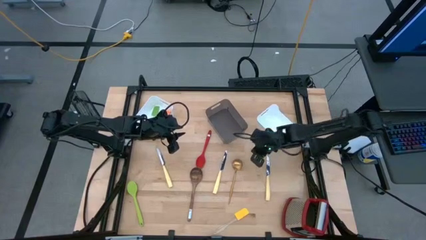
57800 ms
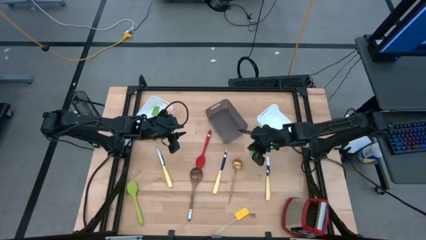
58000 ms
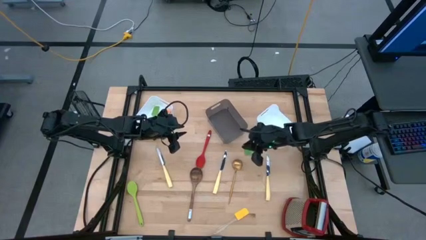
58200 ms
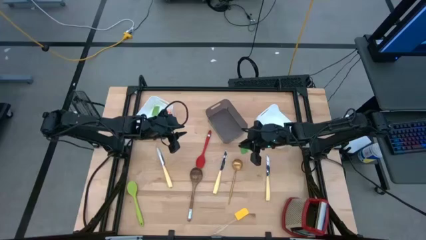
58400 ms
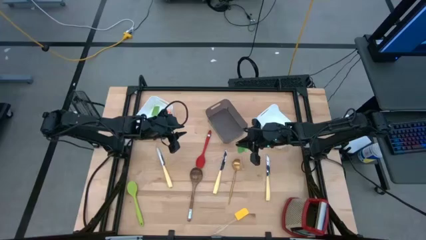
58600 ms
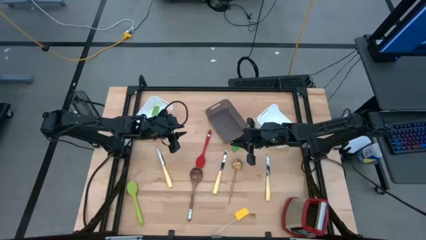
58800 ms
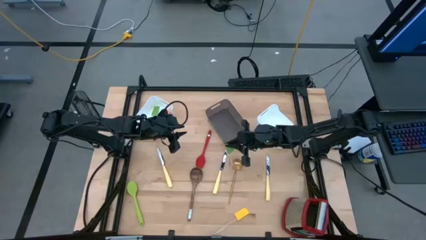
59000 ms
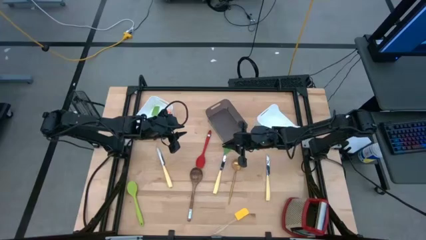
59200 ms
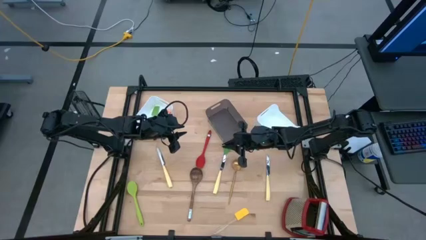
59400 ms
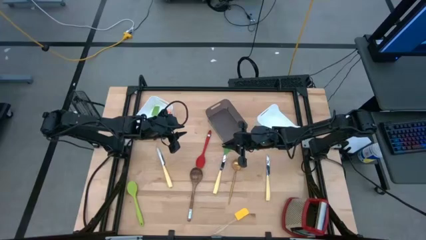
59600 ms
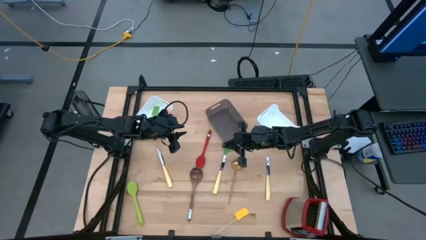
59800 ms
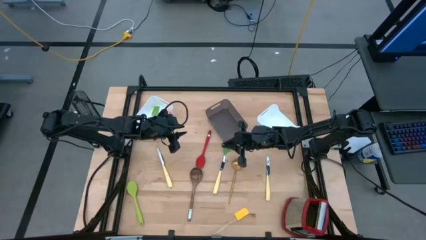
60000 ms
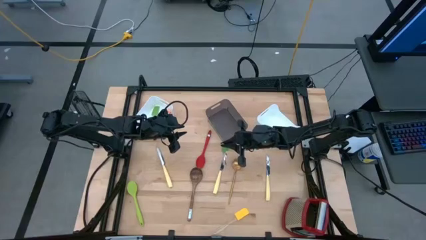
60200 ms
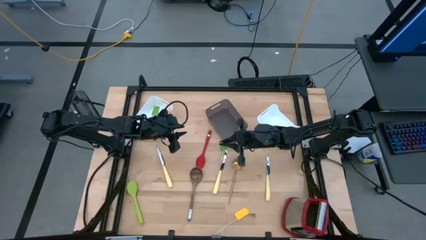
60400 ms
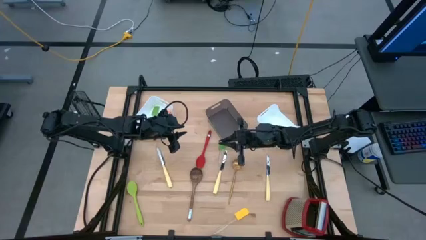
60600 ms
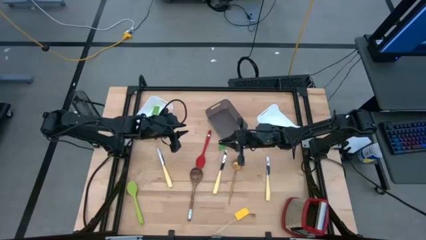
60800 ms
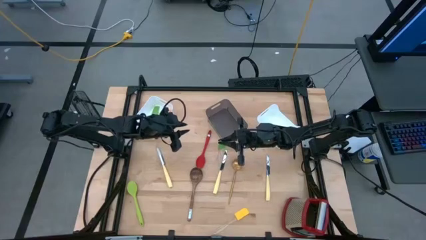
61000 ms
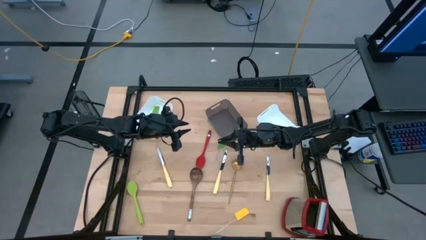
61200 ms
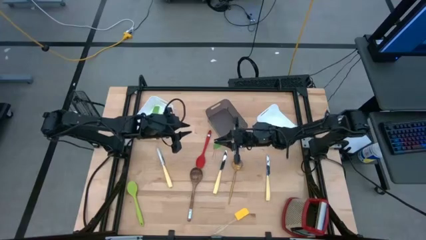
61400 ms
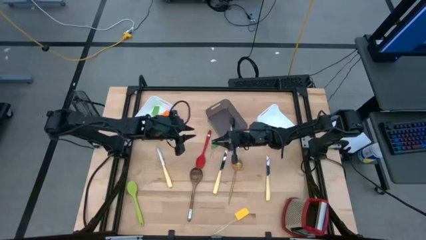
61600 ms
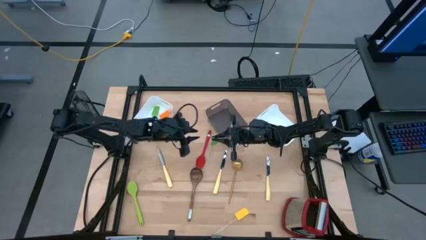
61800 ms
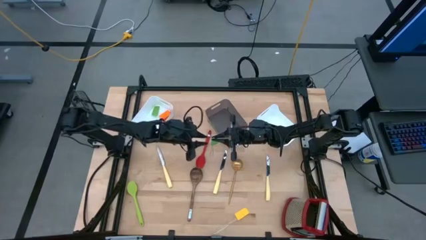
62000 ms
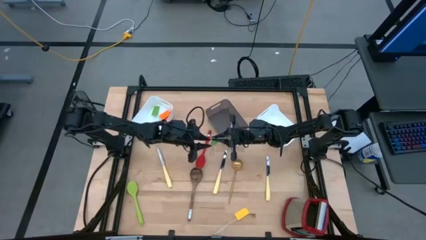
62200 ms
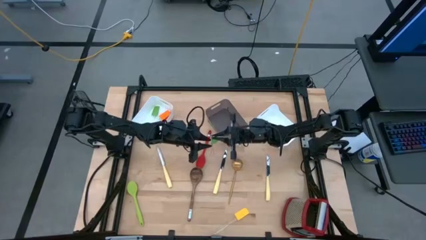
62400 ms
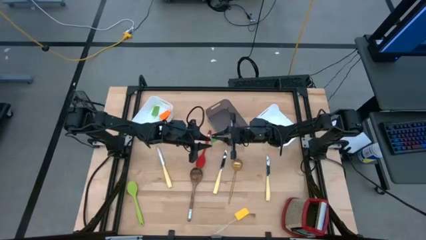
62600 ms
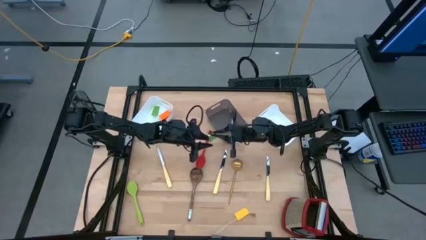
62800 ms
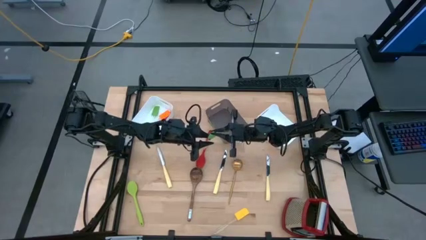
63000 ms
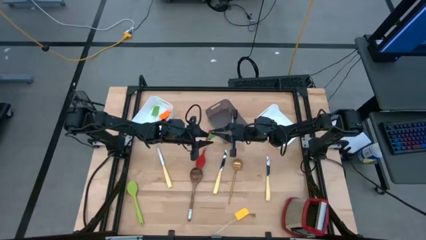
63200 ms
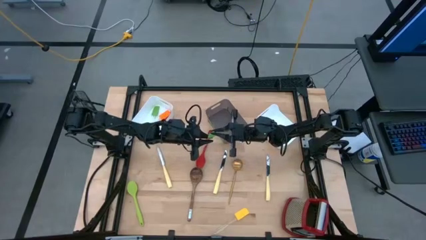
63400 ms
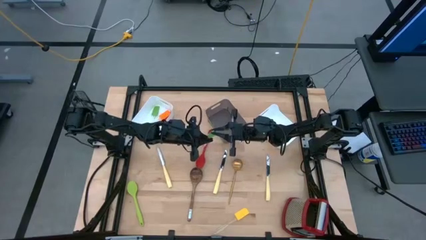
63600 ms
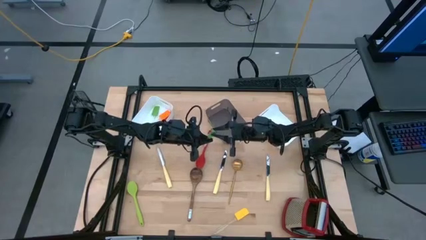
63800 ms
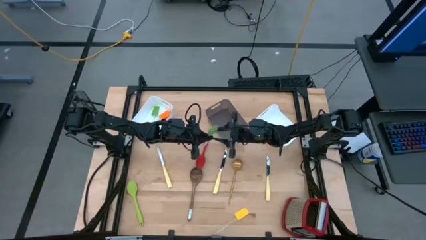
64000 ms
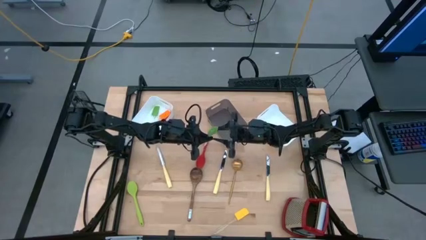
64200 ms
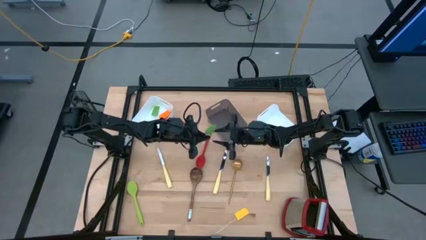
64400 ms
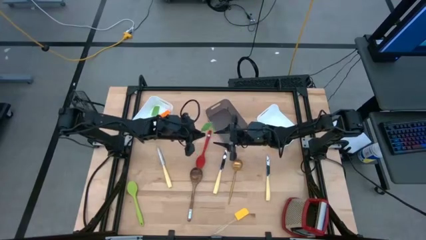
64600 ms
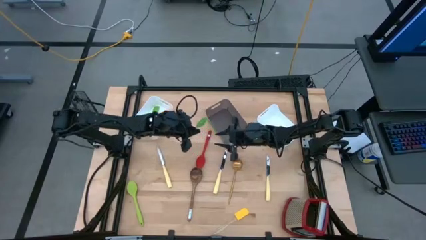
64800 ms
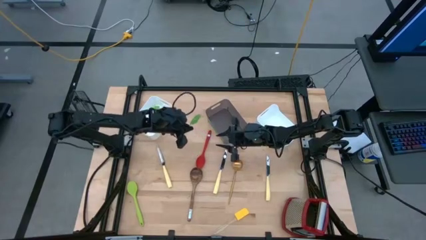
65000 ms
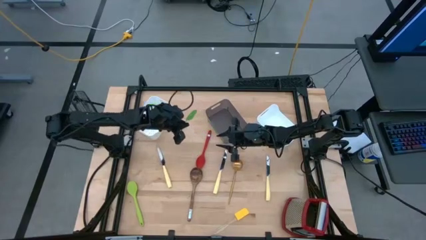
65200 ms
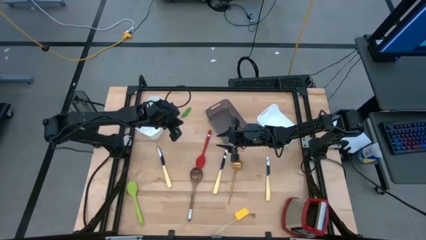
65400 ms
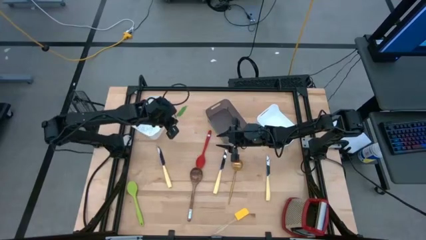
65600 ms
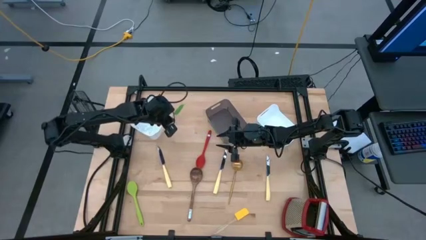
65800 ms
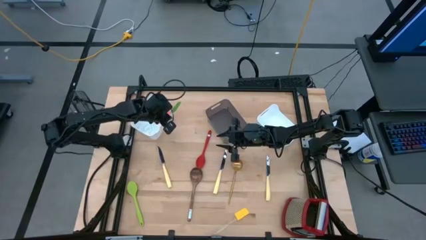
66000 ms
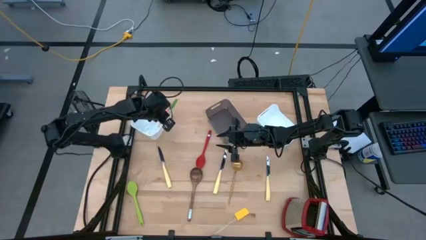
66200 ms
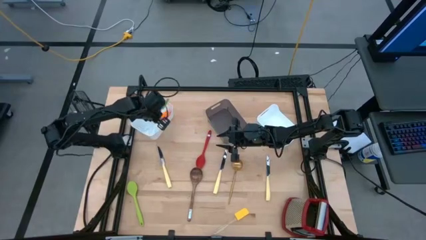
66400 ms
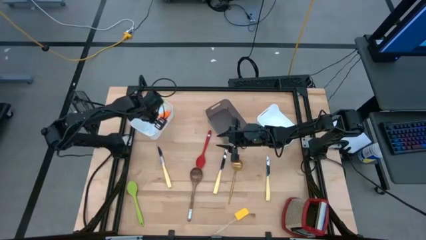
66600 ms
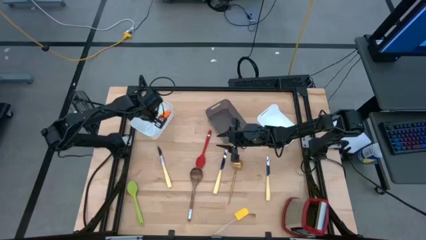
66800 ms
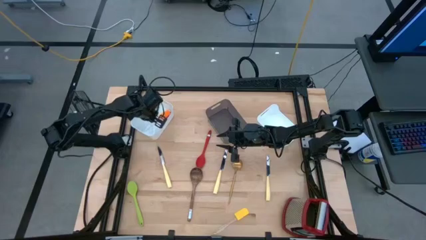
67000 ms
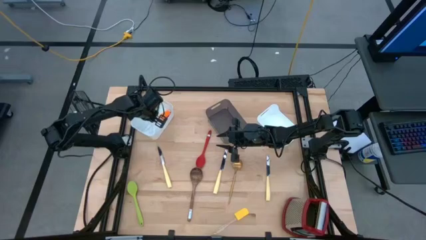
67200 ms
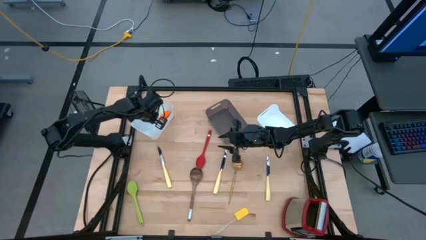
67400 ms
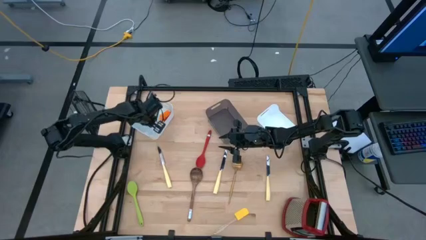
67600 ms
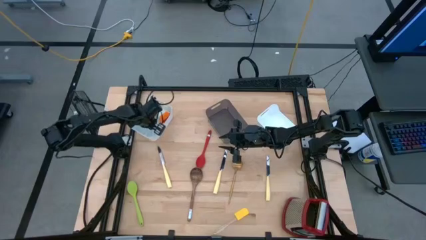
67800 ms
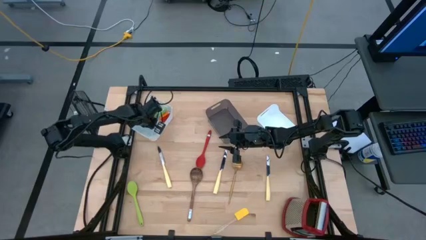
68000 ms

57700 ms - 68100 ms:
Task: Pick & Place Kitchen Items
Put the green spatula into the left white bin
